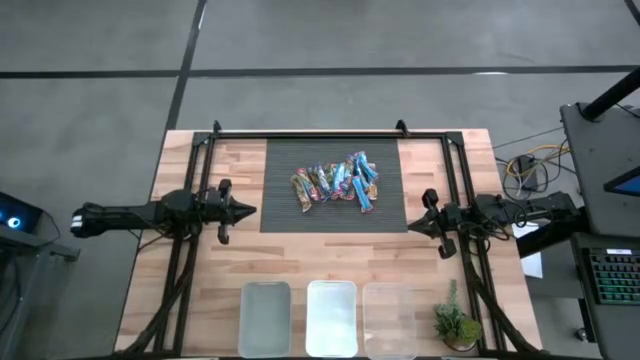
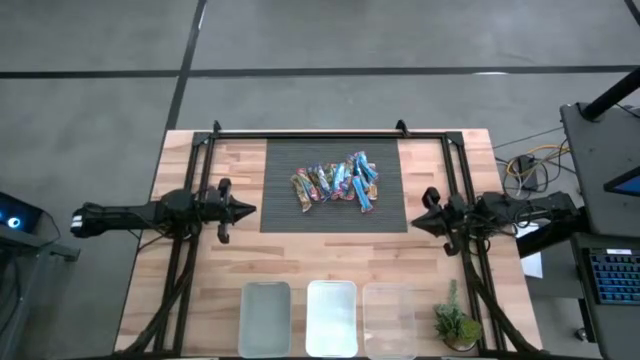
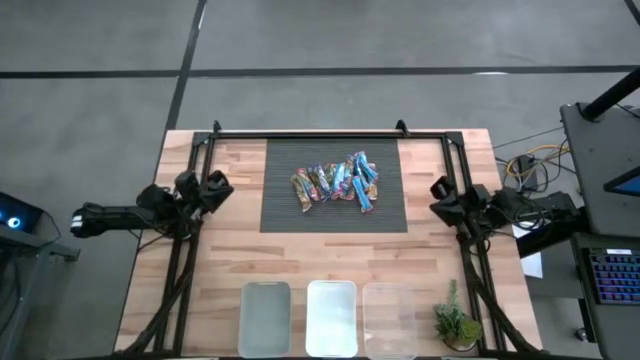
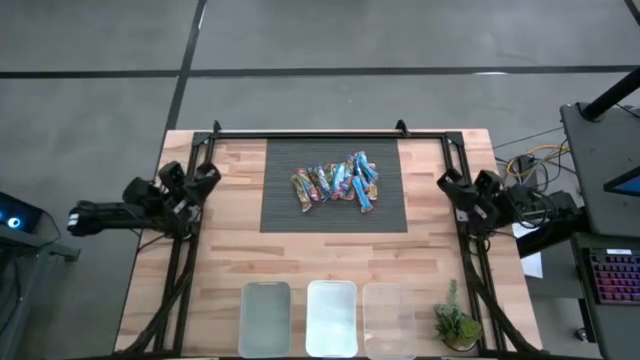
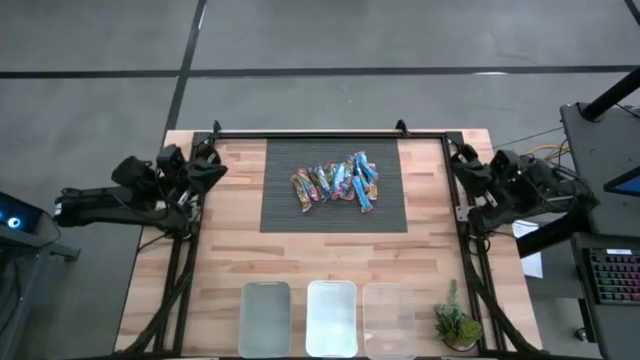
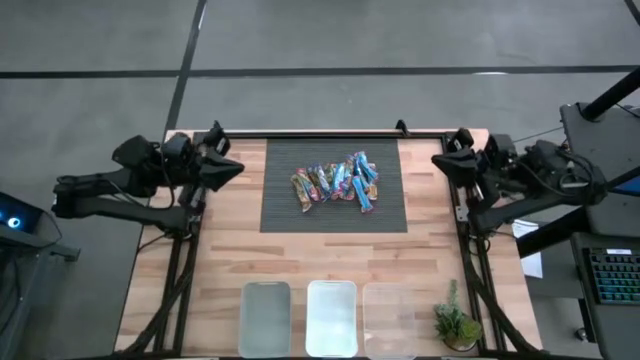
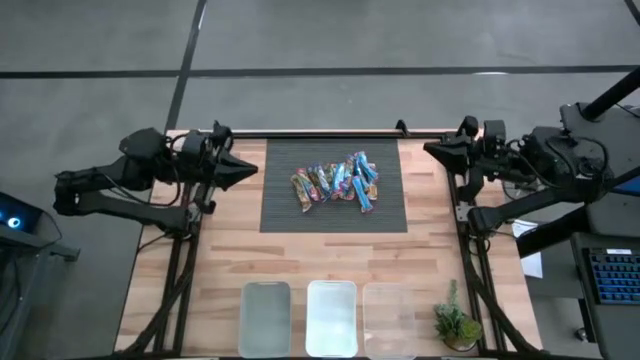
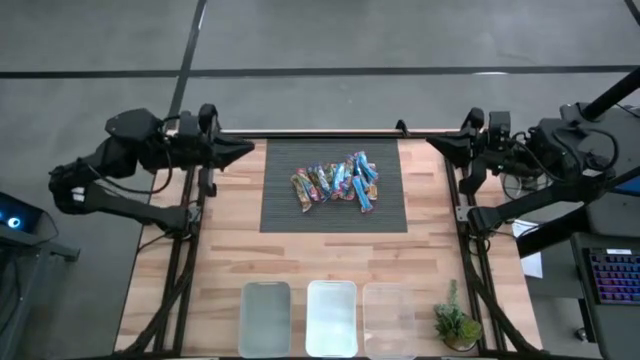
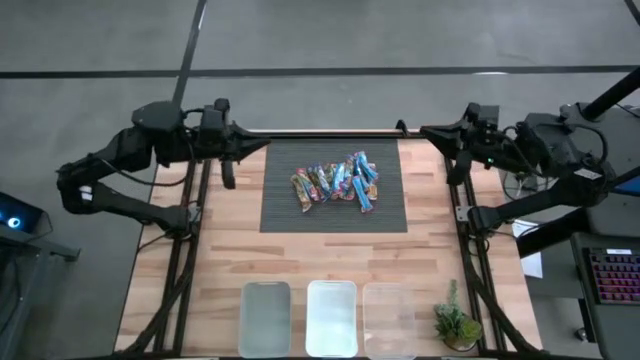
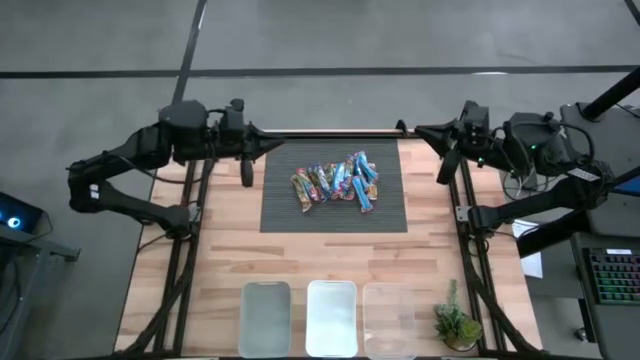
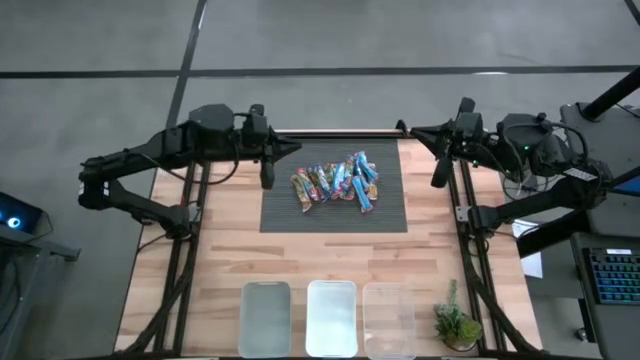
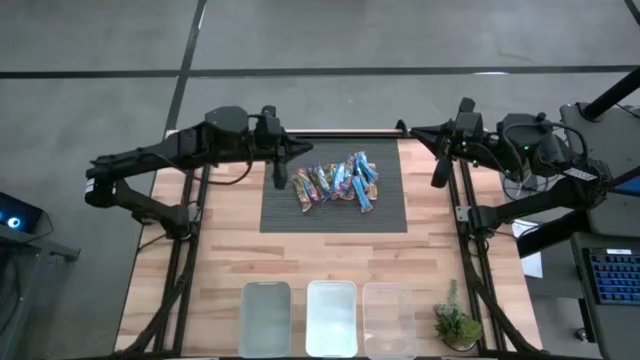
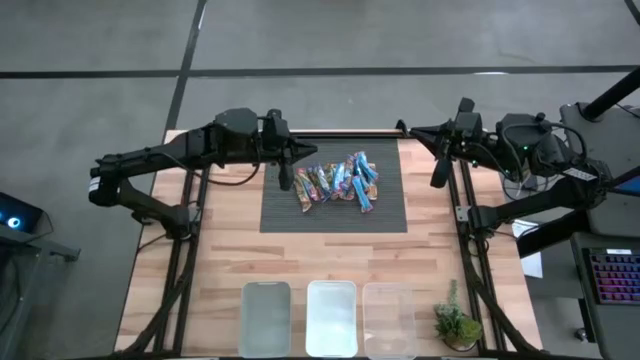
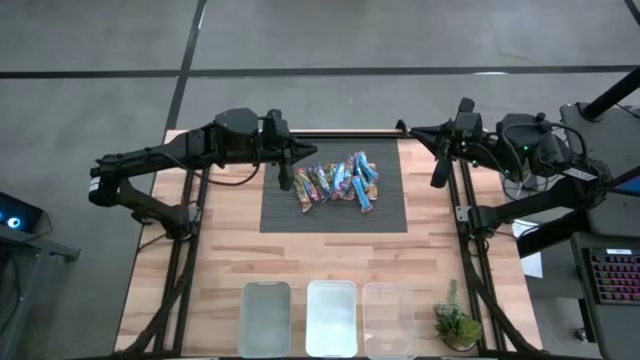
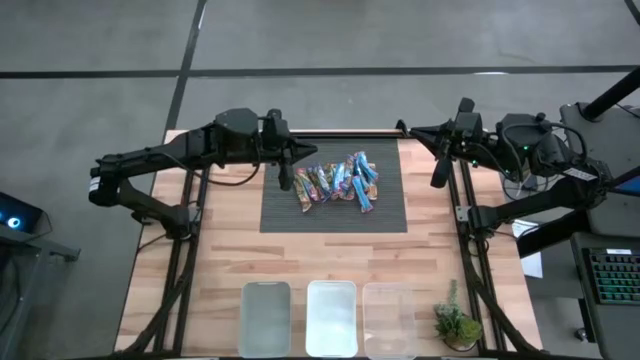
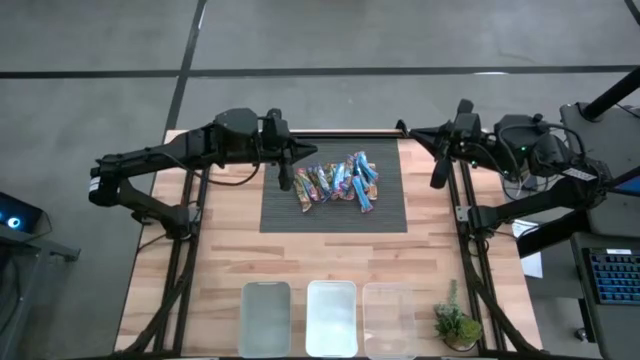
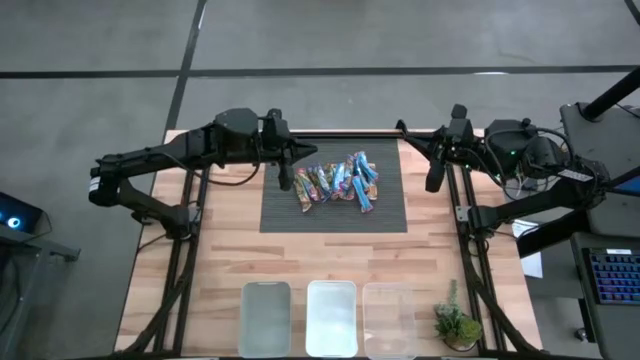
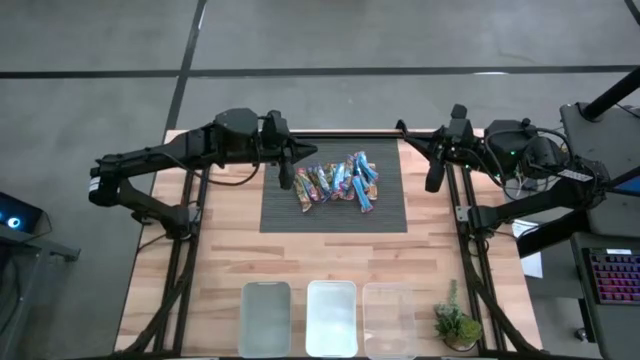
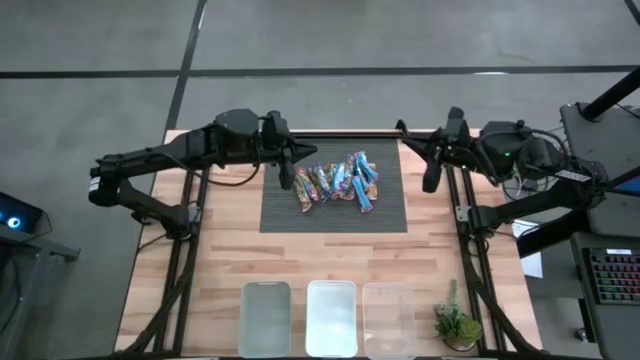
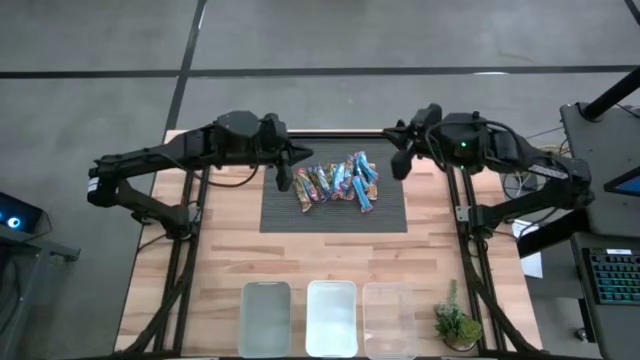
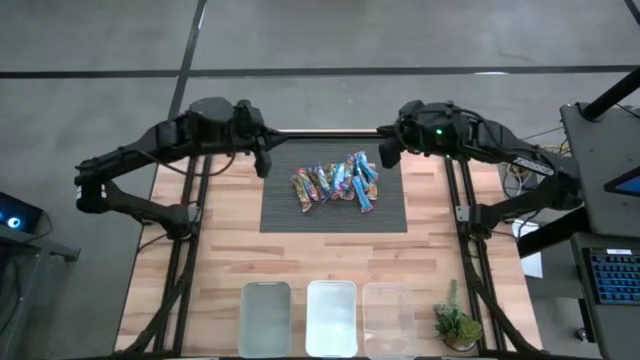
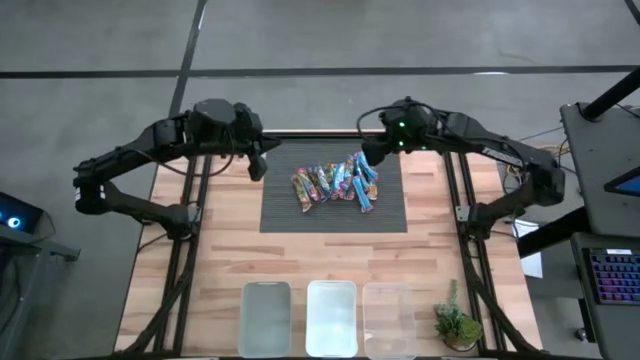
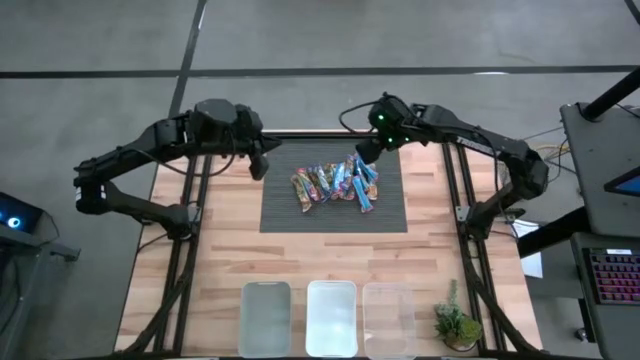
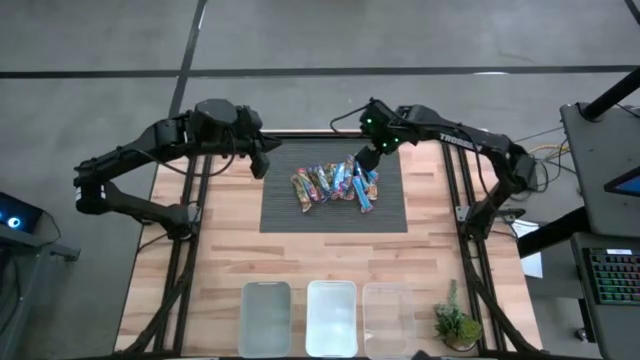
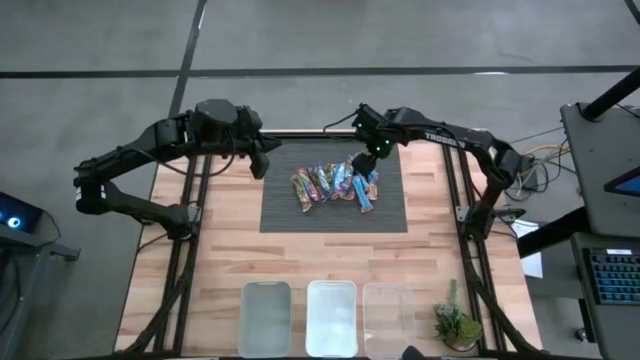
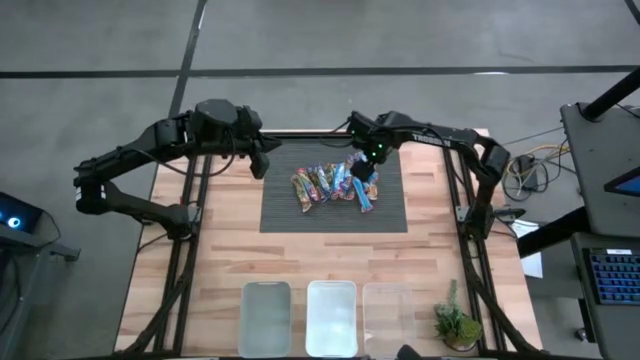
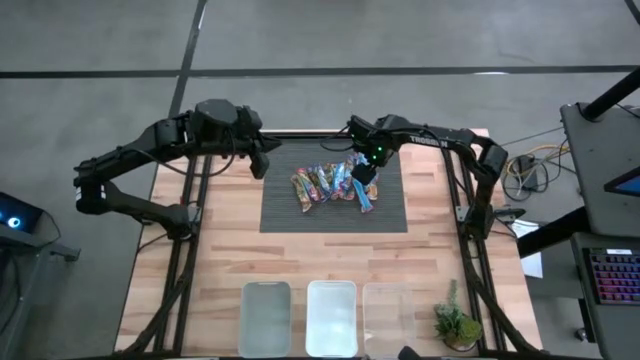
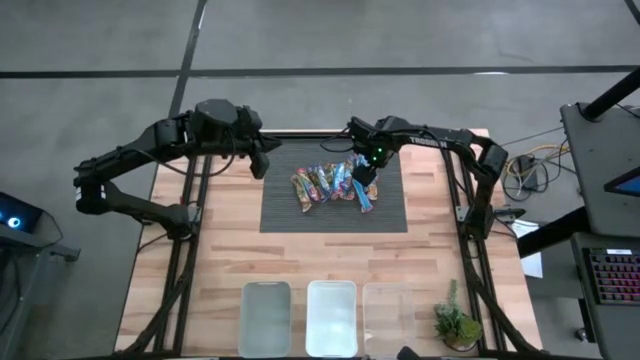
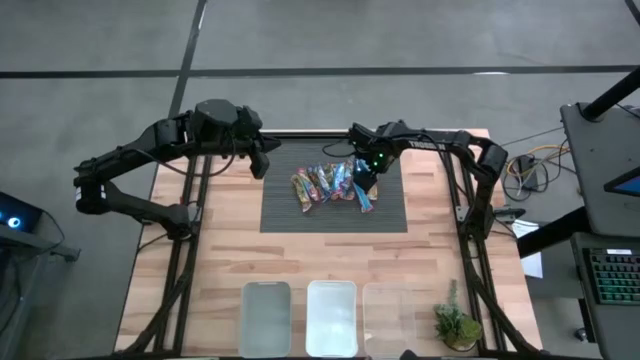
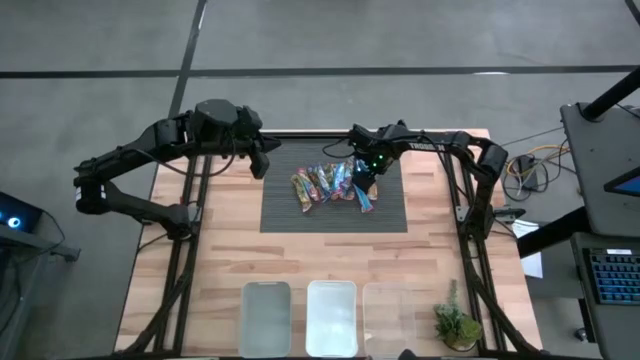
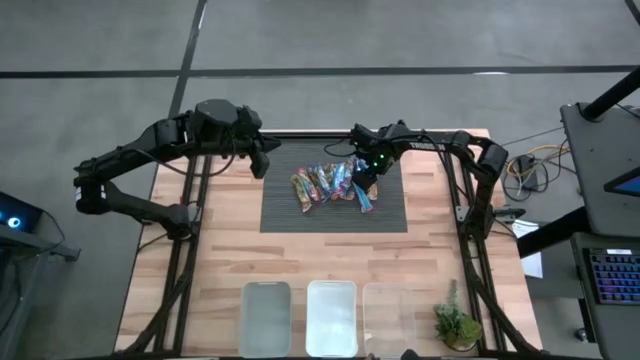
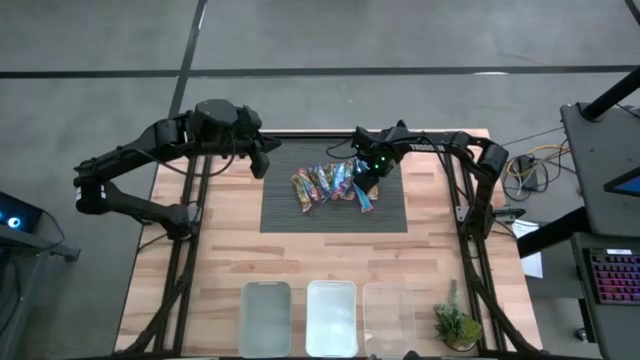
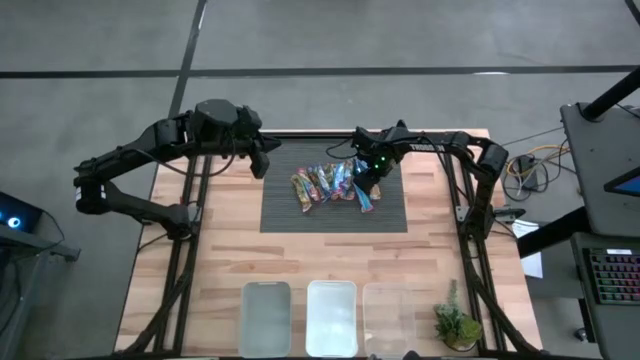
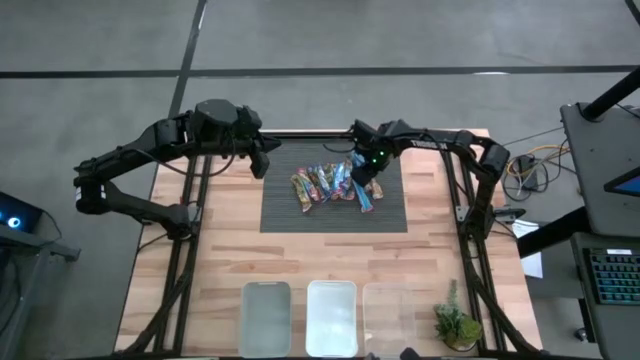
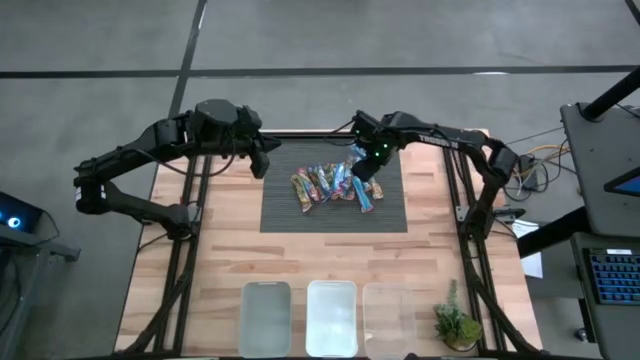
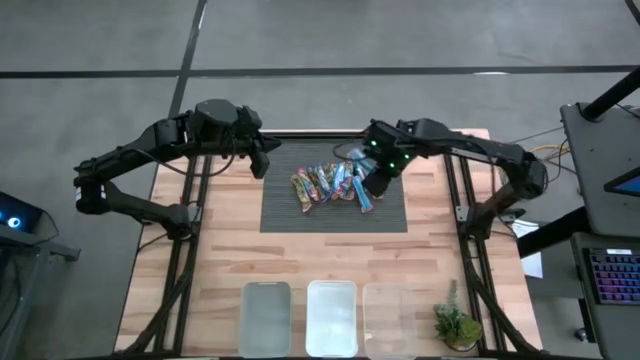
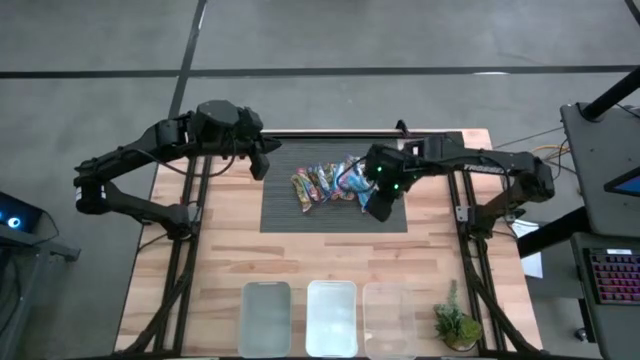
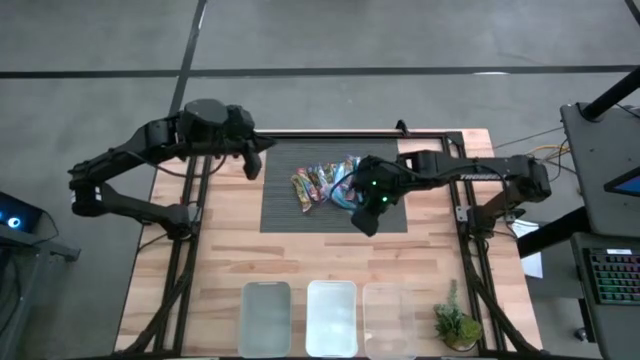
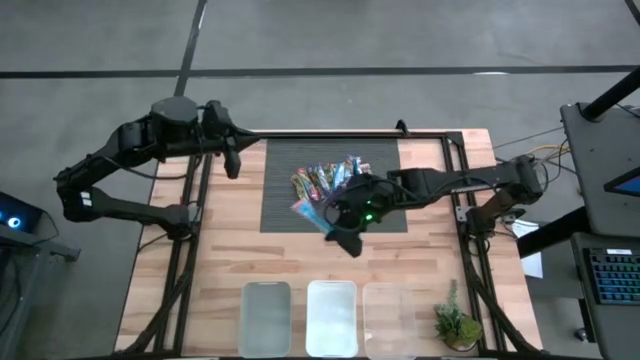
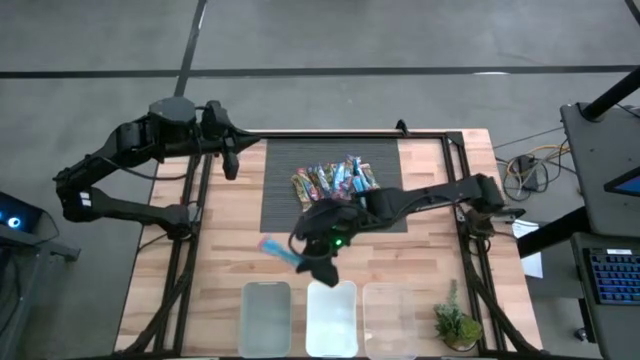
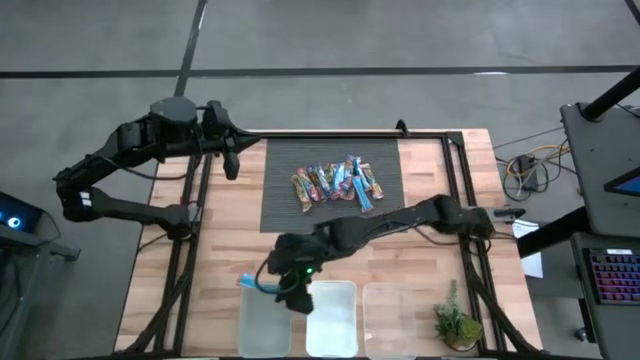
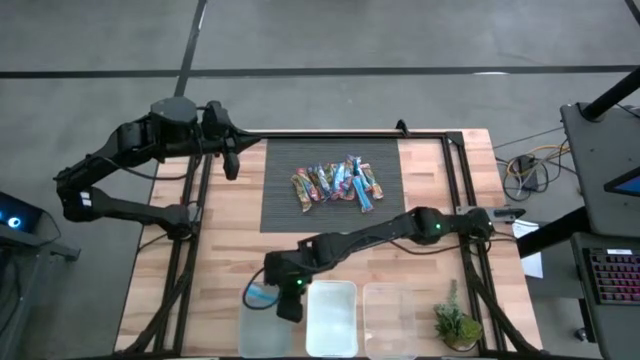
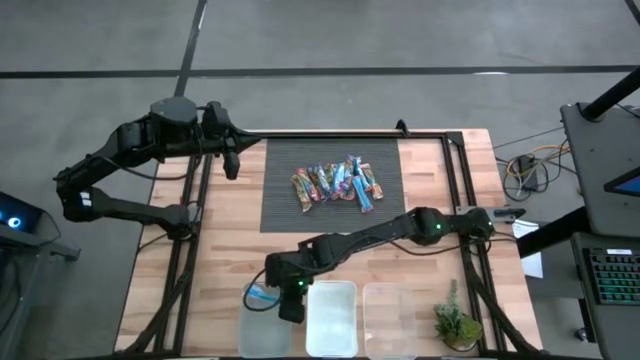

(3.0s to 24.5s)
Task: Pick and place Granola Bars by type
Put the red granola bar into the gray bin
